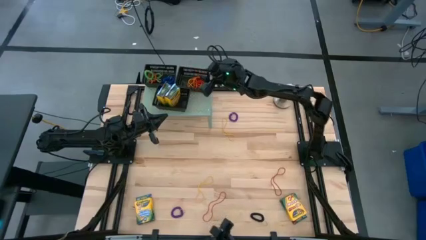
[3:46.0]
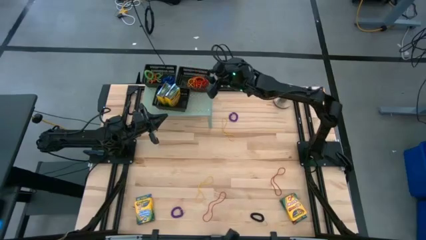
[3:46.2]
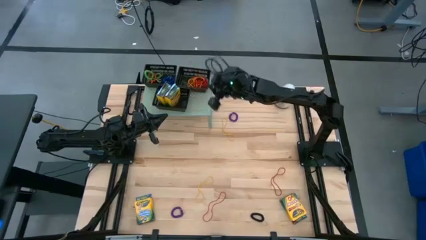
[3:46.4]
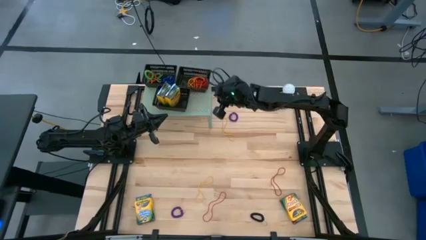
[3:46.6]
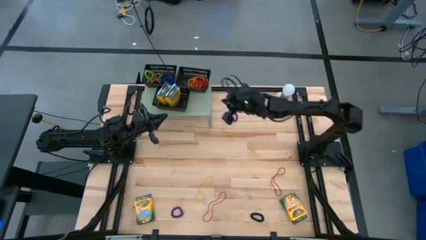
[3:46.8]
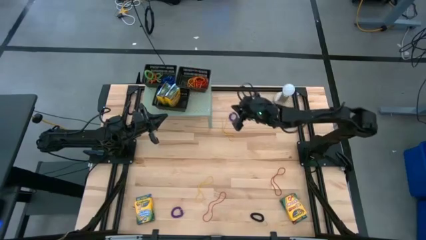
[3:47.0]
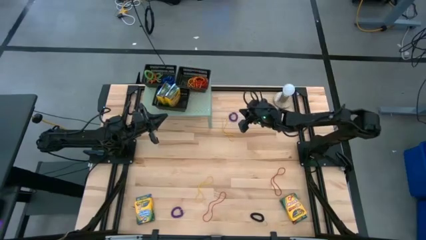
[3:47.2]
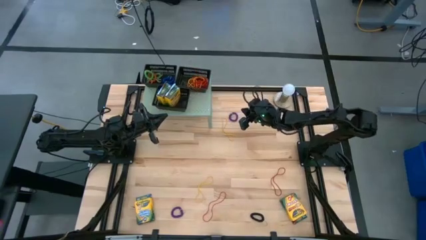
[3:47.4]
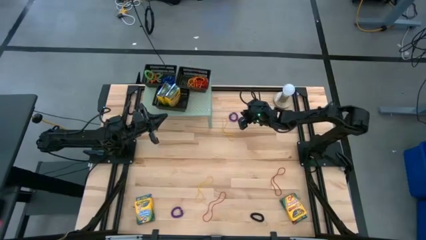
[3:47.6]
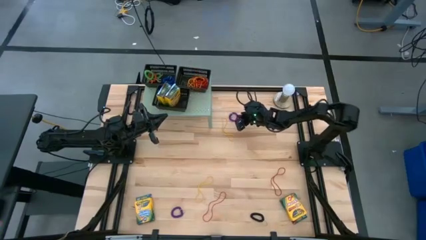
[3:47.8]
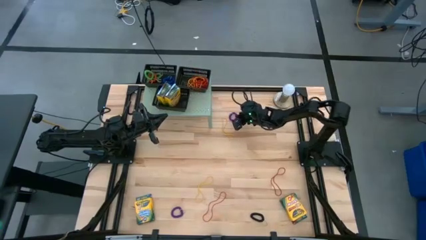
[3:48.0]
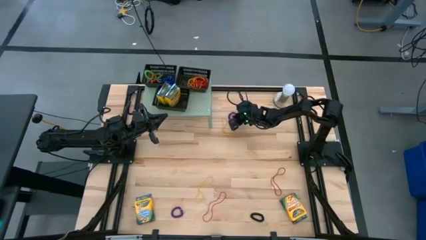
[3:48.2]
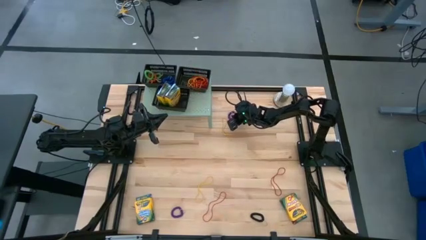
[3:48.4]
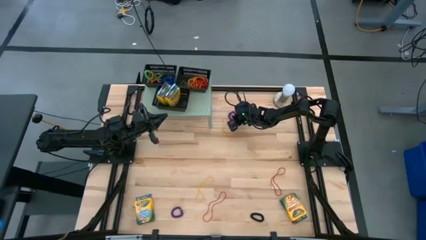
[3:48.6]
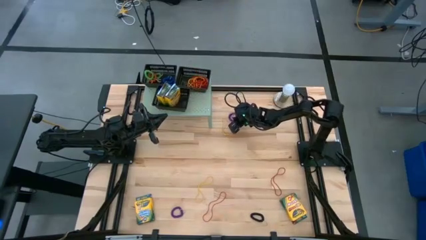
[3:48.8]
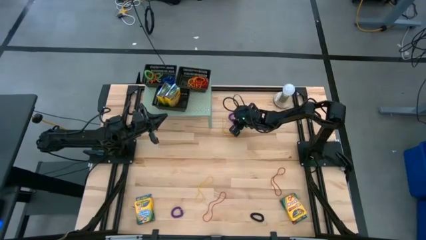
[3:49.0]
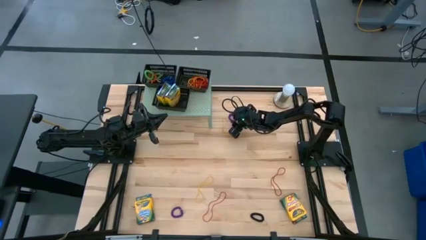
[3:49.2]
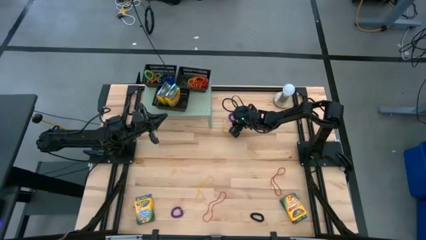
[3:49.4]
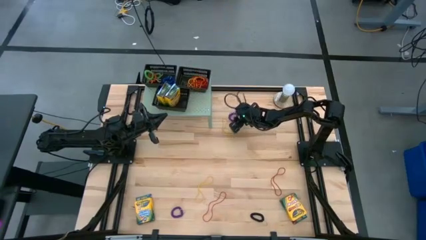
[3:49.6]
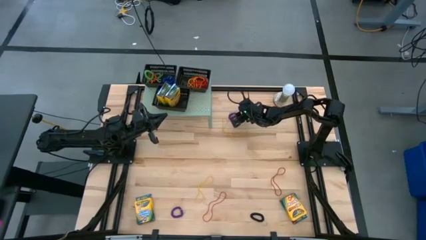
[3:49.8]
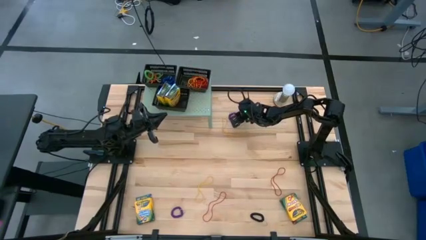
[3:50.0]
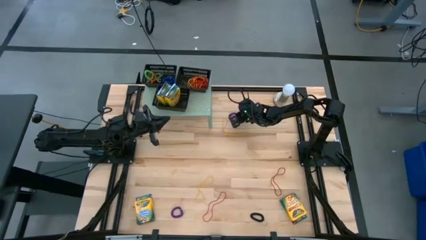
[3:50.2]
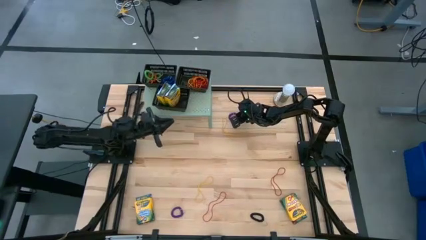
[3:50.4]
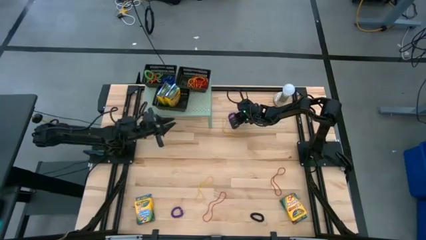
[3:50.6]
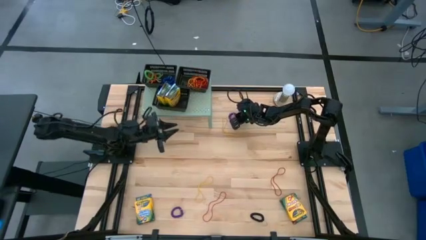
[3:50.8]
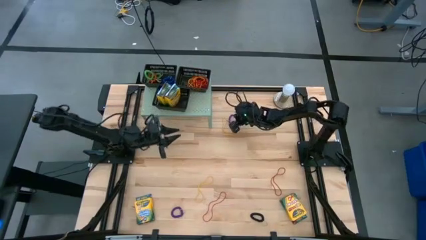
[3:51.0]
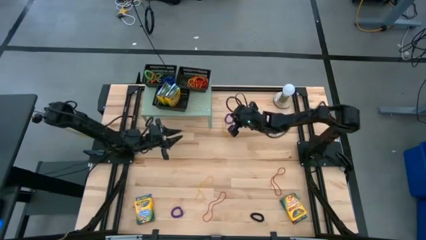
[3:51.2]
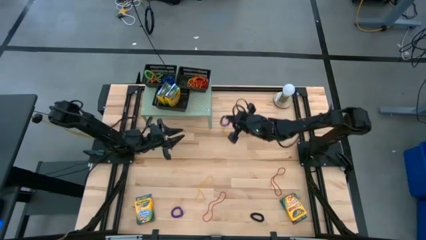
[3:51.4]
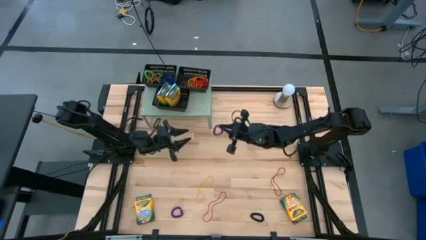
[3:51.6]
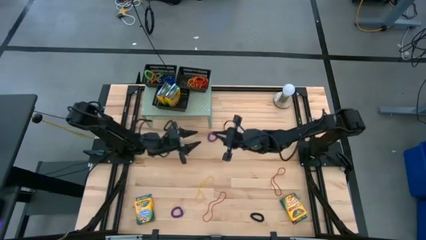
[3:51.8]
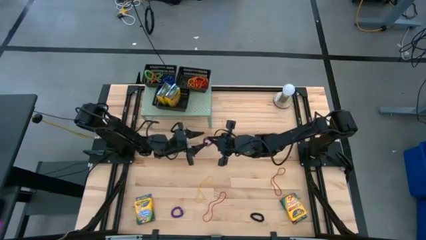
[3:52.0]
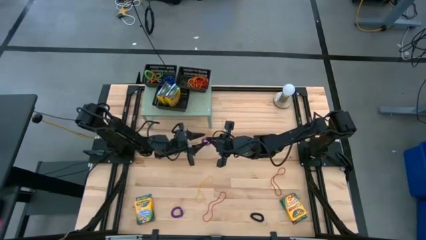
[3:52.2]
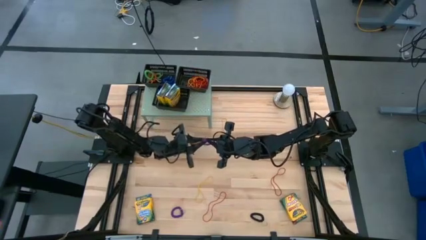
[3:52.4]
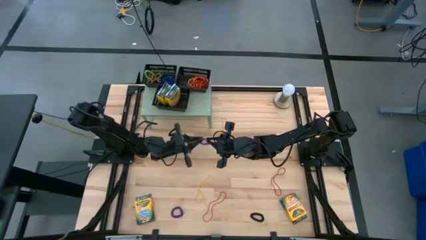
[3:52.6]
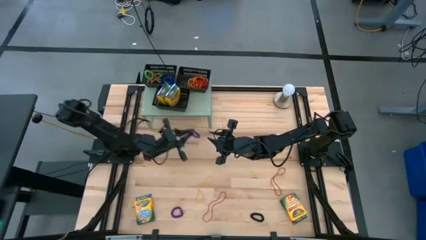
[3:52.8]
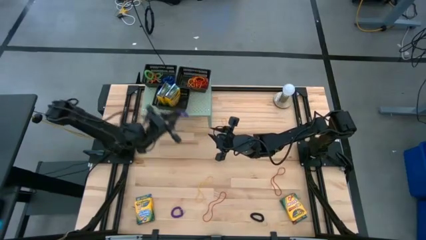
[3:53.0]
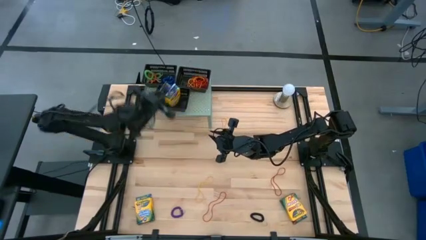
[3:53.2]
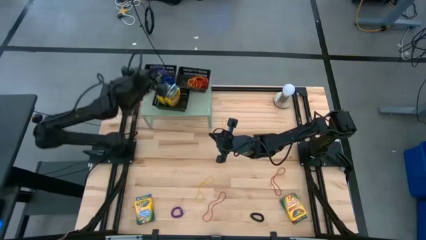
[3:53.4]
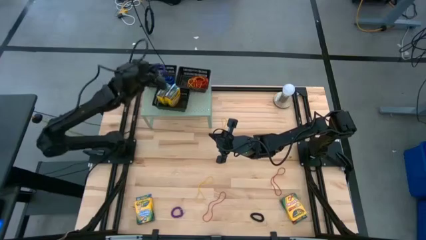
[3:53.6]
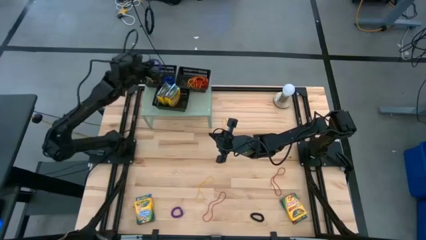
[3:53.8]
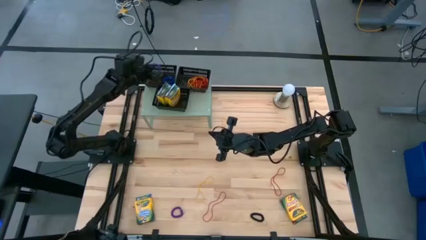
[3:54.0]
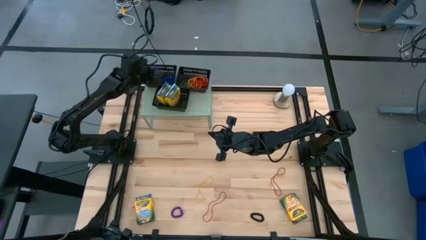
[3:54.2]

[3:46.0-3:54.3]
Task: Pick & Place Office Desk Supplies
Put the top violet spring rubberband into the top left black bin

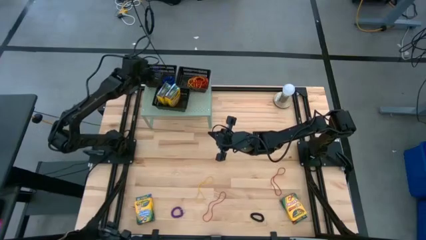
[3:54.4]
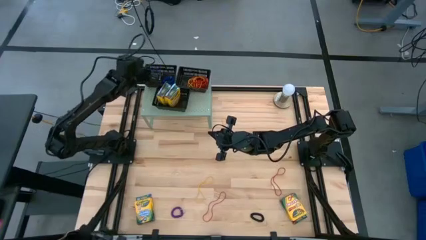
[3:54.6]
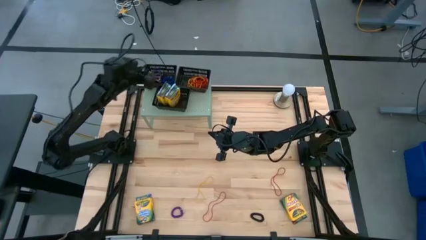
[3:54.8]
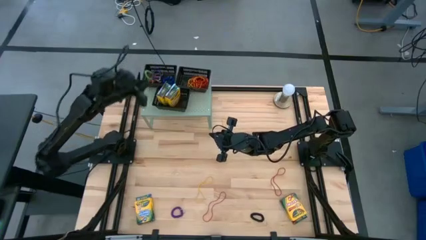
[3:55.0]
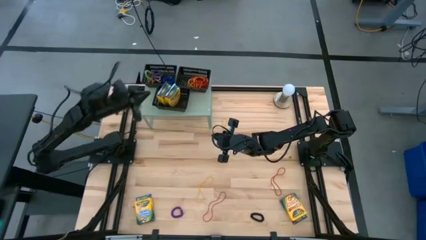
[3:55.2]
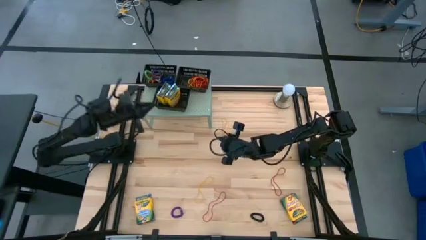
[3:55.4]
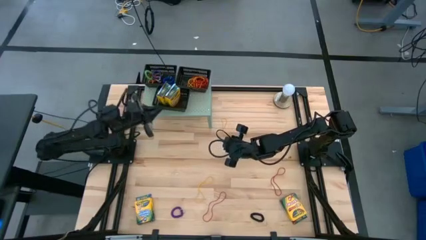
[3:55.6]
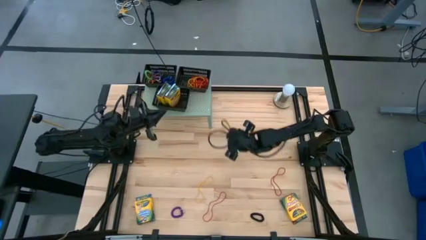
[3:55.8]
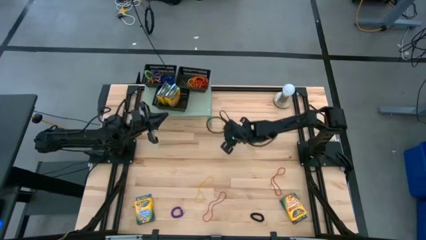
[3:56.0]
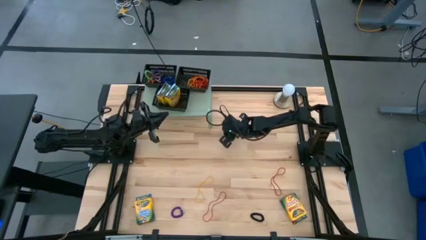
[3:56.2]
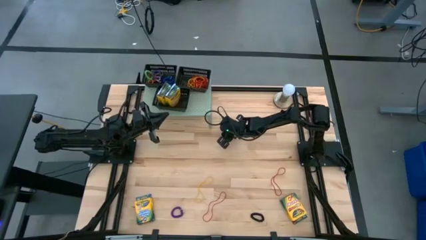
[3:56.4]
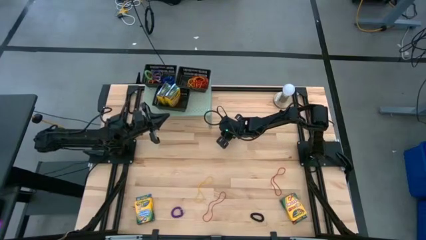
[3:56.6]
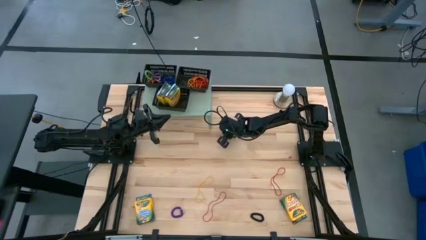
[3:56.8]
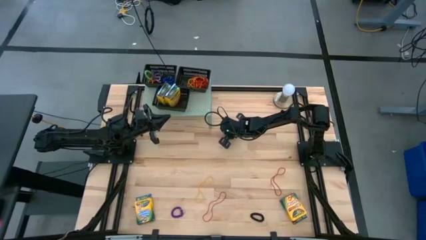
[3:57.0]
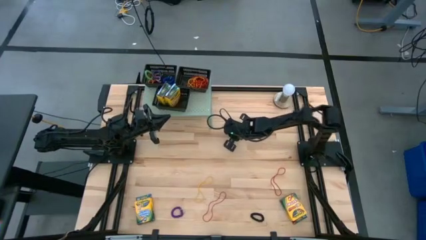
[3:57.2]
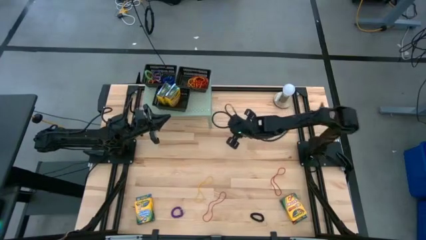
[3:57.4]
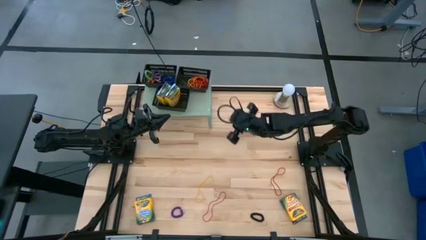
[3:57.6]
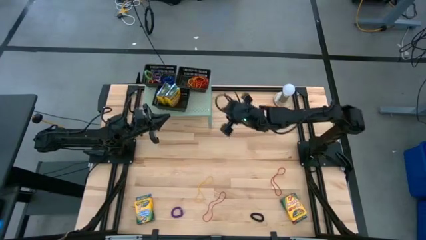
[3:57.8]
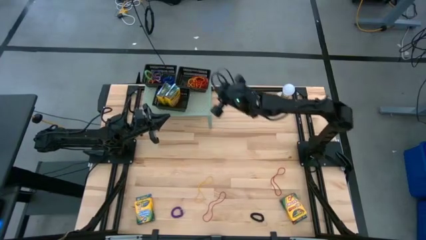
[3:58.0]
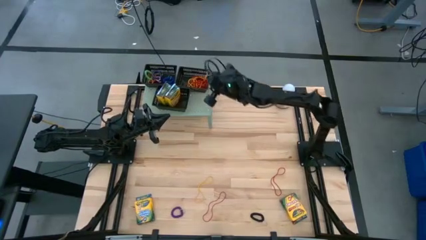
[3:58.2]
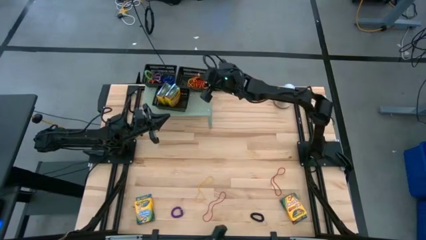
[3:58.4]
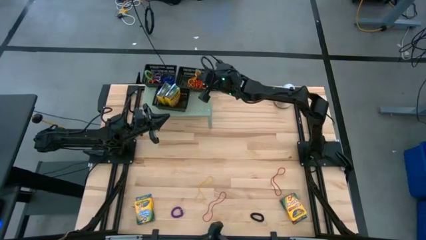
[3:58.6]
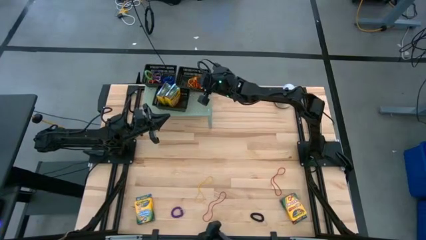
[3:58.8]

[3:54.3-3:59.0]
Put the yellow rubber band into the top right black bin

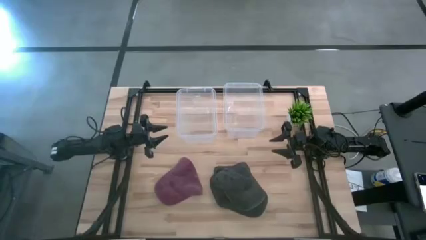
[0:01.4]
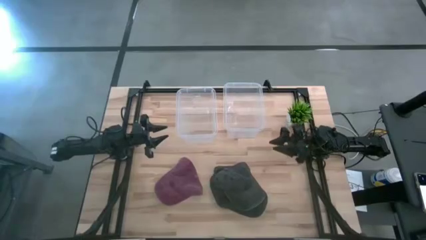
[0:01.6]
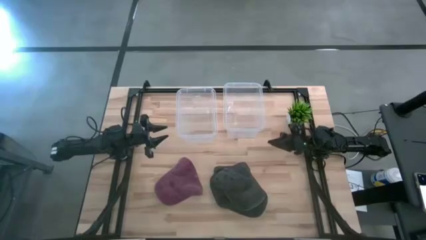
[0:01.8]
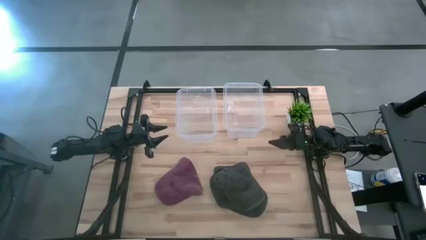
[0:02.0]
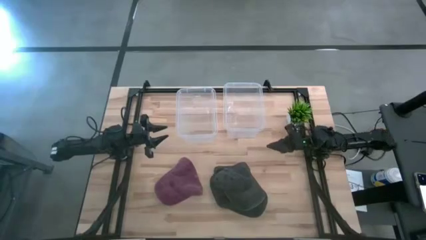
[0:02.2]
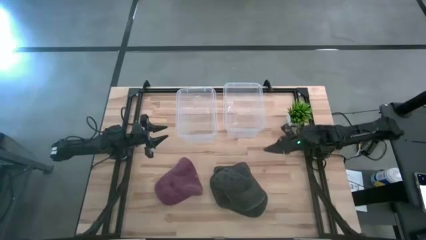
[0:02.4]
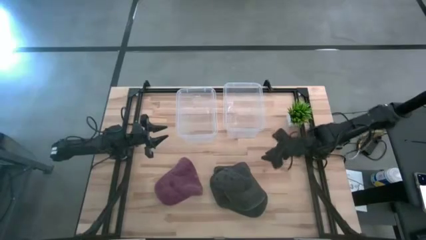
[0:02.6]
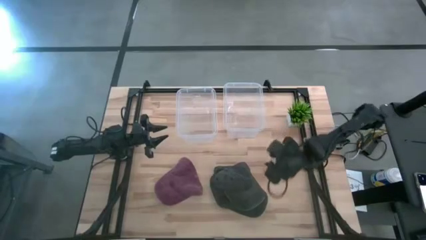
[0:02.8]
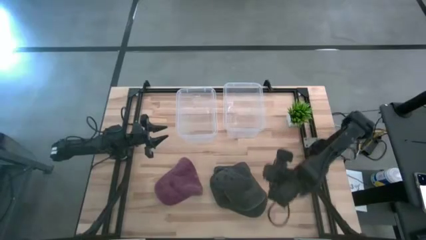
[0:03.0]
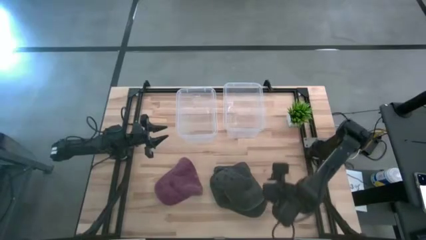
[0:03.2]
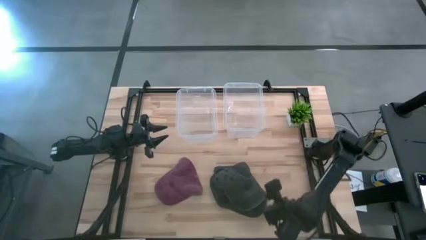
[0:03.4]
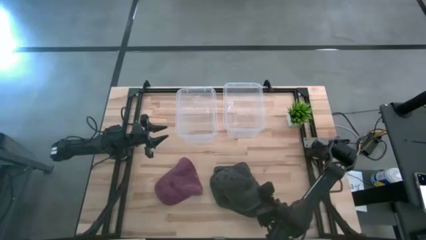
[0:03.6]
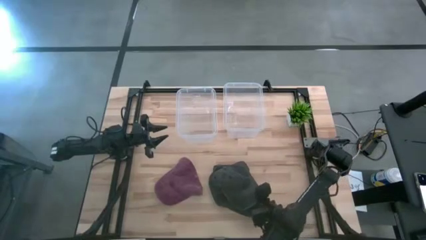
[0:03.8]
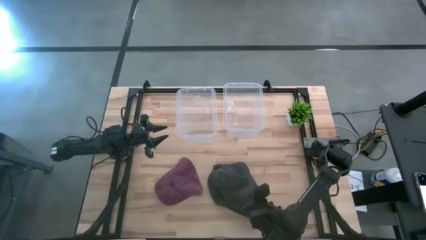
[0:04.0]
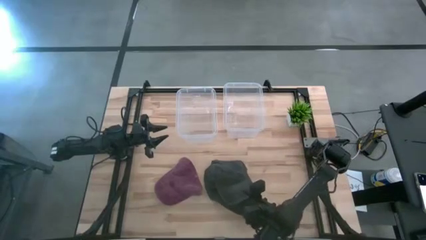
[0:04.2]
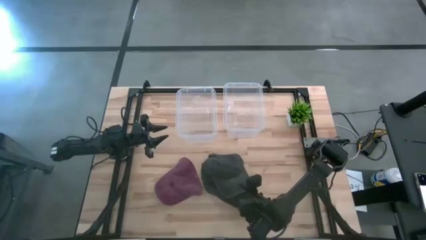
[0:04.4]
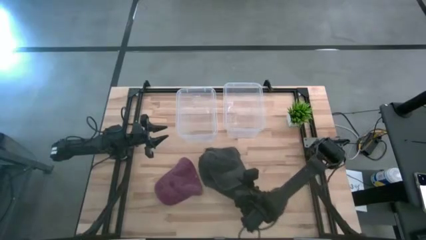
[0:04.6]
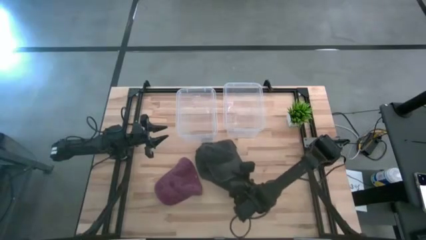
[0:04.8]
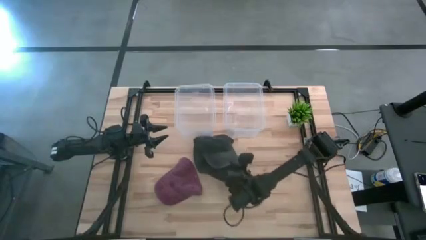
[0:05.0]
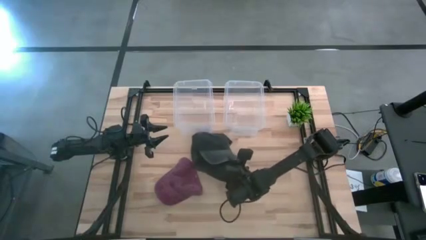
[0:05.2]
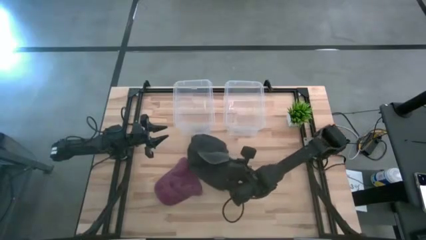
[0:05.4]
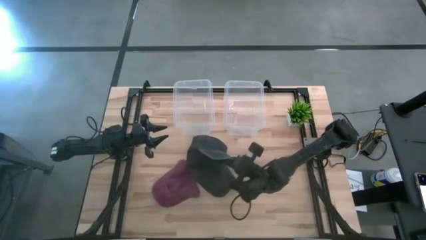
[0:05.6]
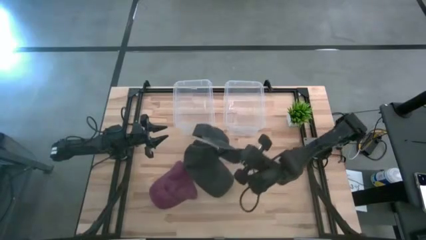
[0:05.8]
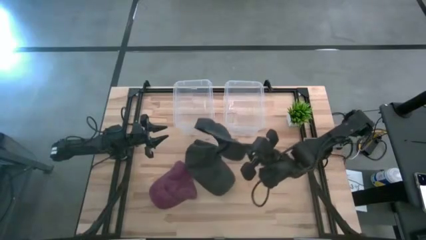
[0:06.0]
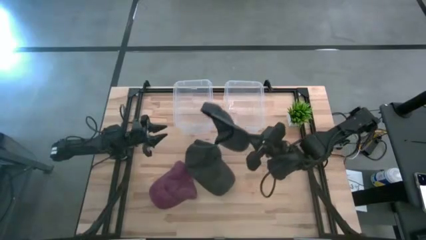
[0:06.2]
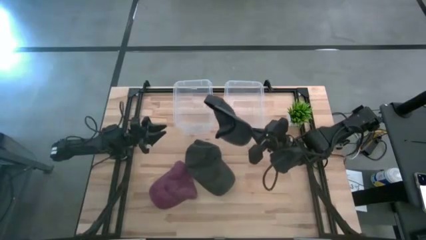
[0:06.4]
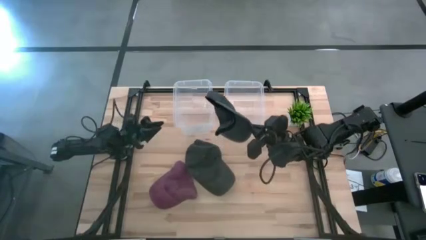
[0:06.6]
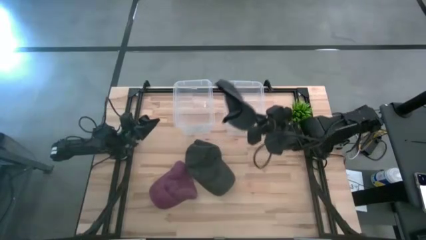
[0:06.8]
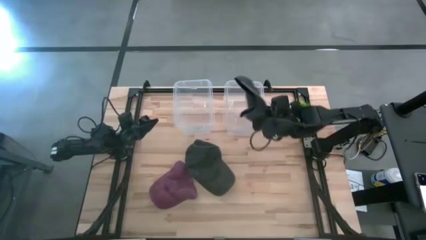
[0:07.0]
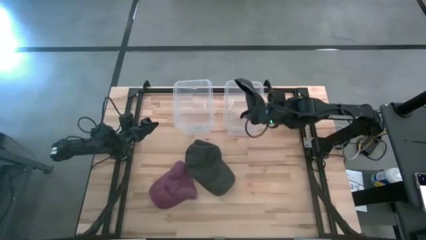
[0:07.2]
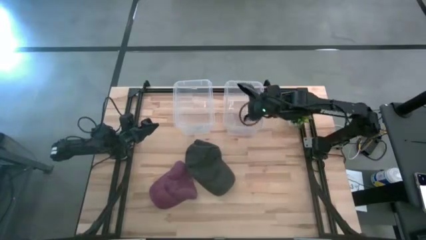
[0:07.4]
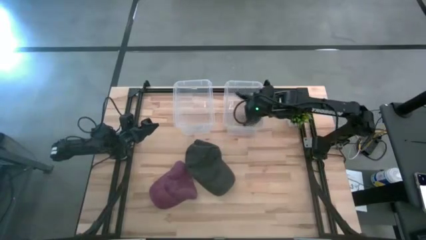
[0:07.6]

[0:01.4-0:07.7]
Task: Pick & Place hat
Put the top black cap into the right transparent bin
